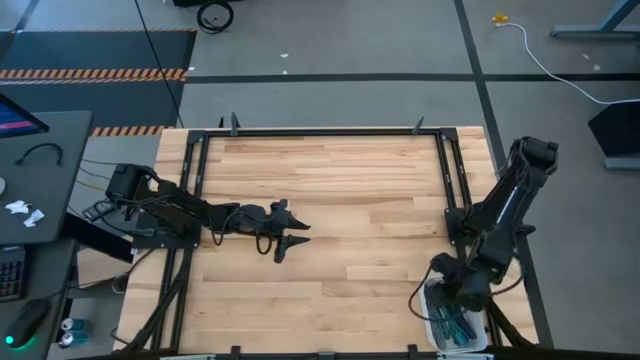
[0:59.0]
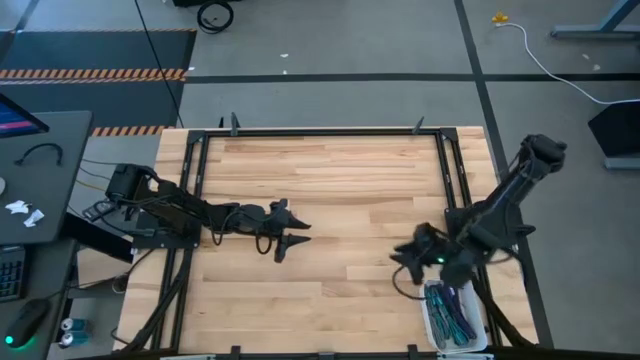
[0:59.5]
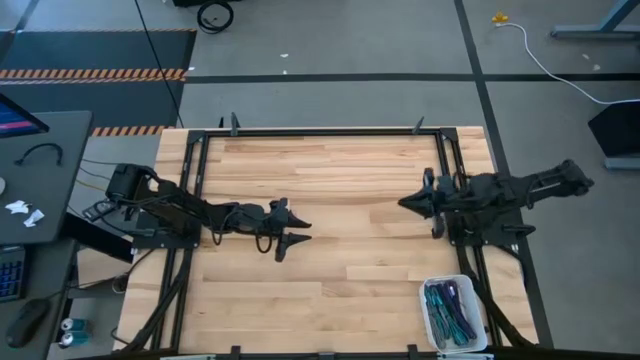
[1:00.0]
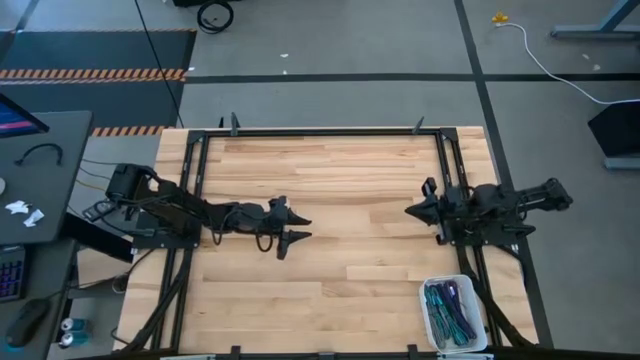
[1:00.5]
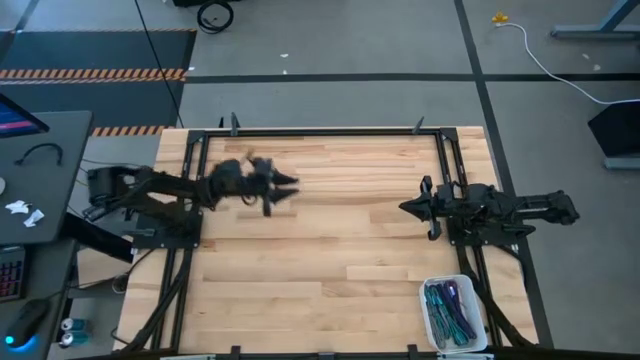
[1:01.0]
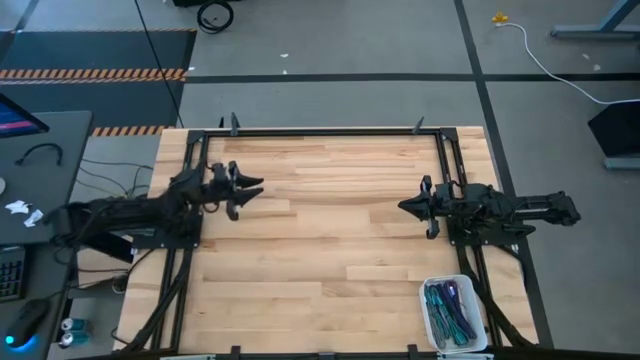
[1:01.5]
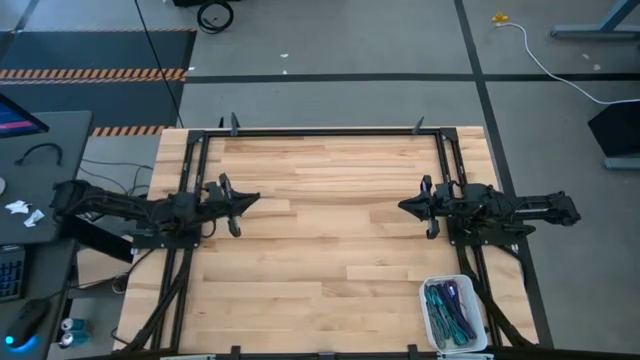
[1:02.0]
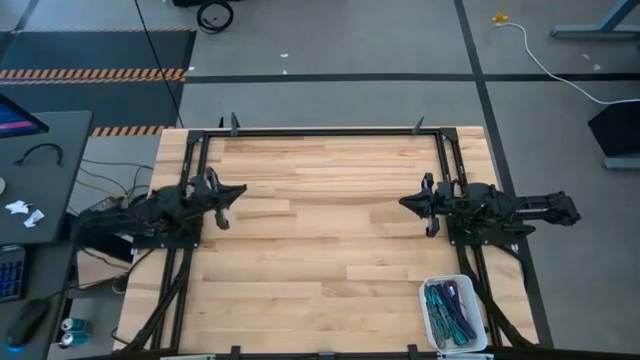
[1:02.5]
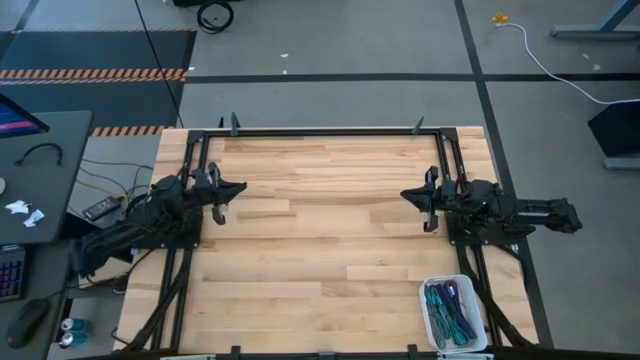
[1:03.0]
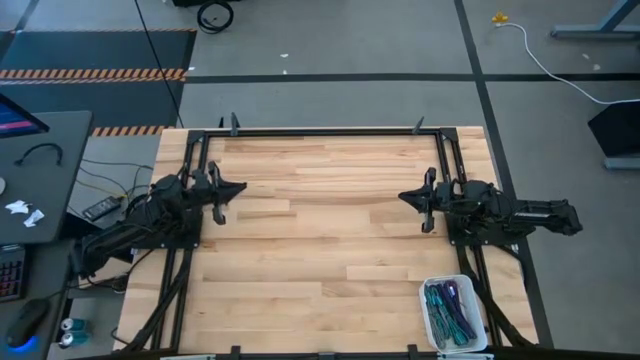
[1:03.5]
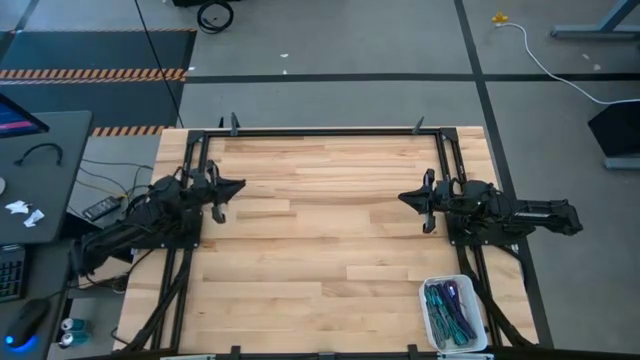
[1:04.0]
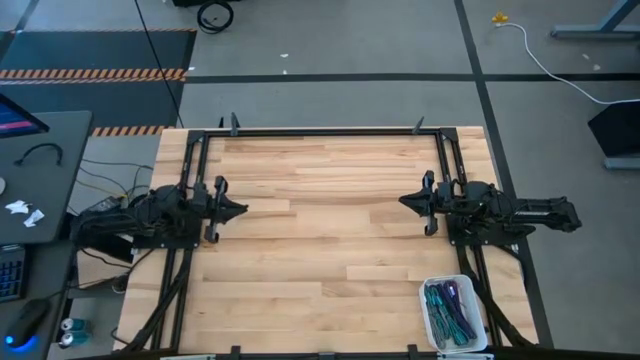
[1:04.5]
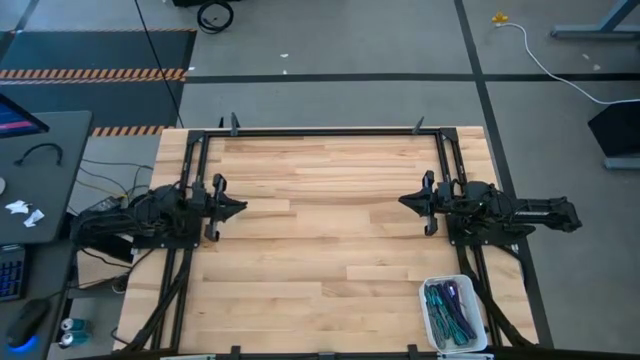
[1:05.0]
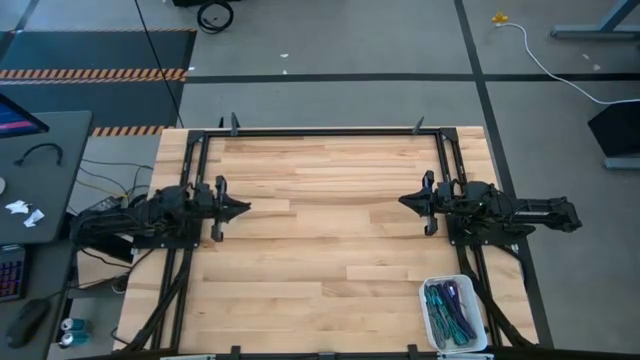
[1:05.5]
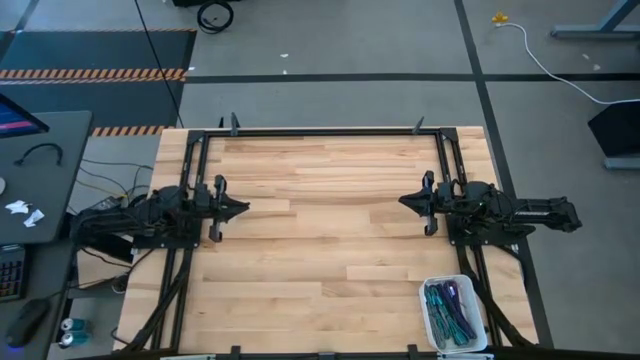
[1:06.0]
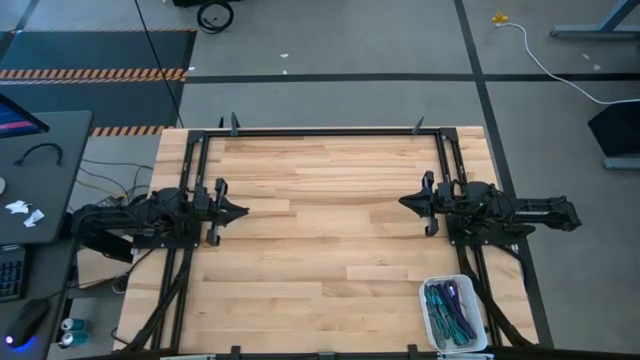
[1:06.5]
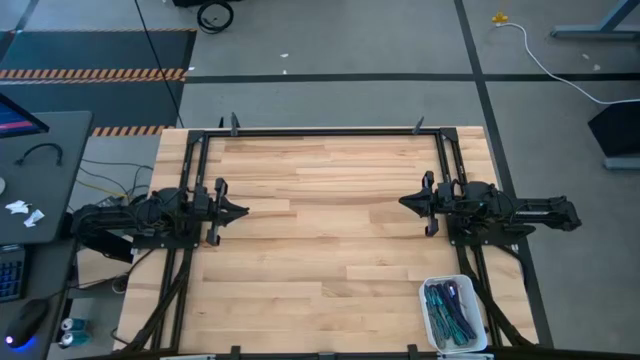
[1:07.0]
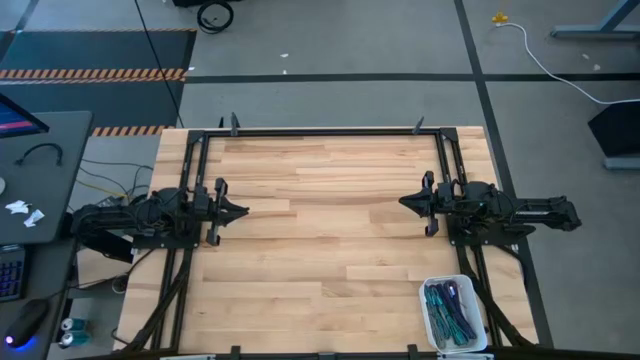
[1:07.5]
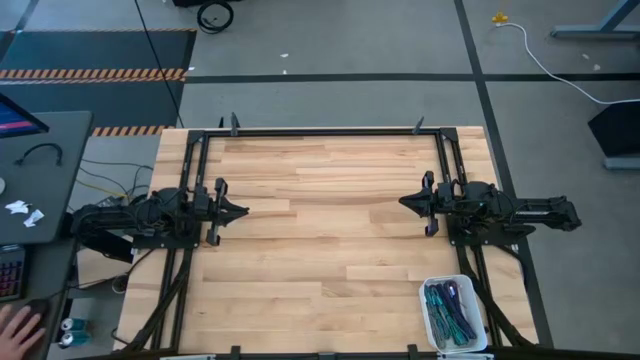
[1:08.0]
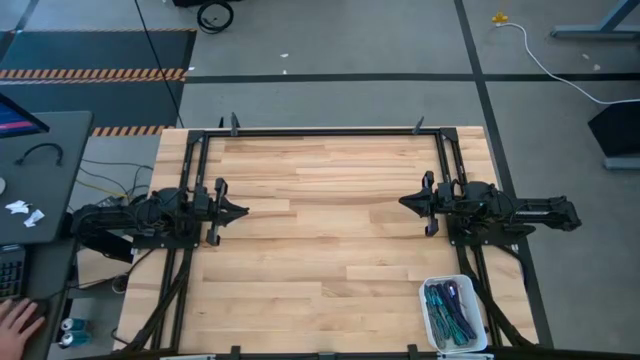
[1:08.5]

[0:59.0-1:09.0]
Task: Pick and place USB-C Cables
Return to Home Position

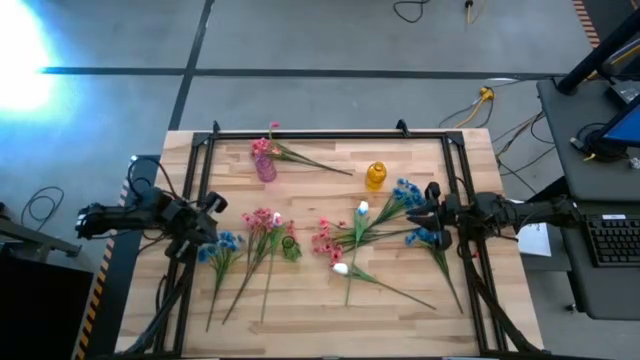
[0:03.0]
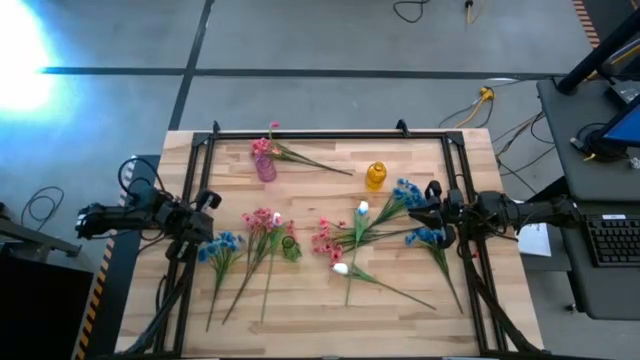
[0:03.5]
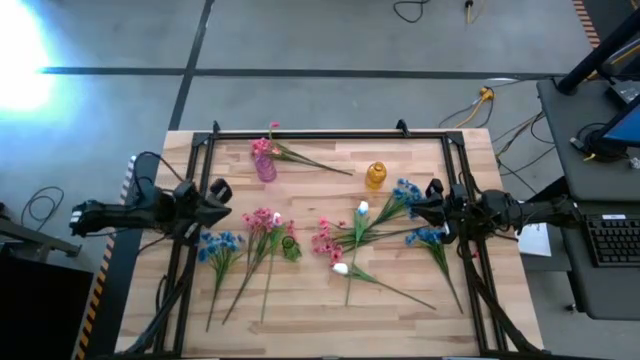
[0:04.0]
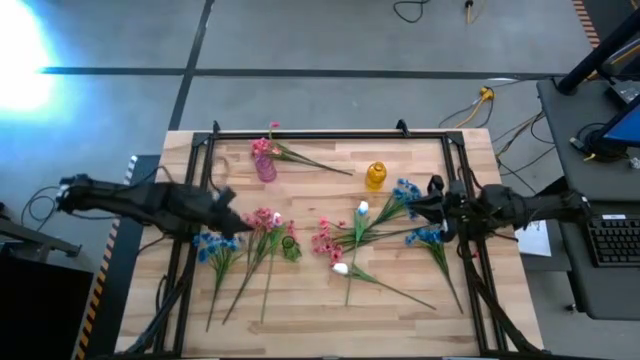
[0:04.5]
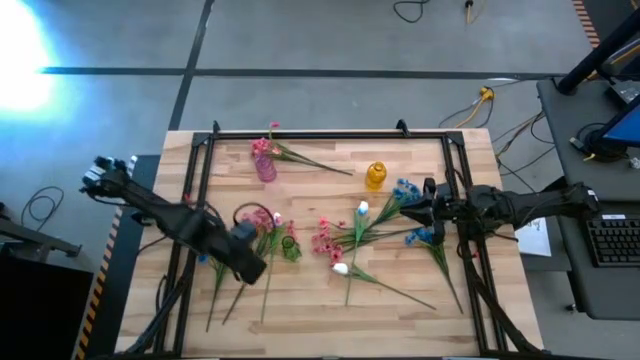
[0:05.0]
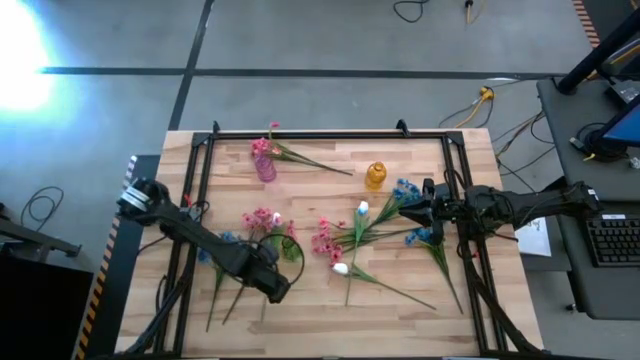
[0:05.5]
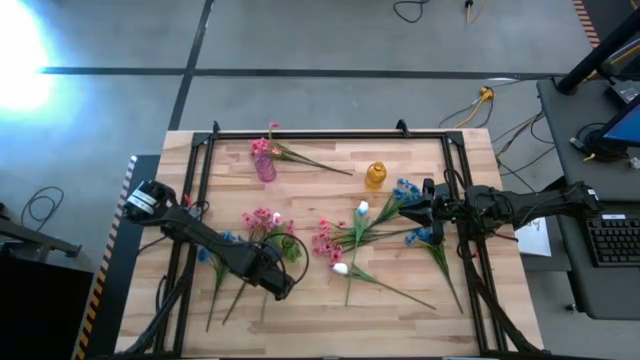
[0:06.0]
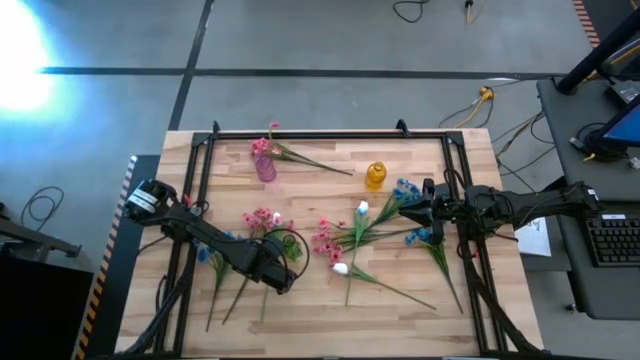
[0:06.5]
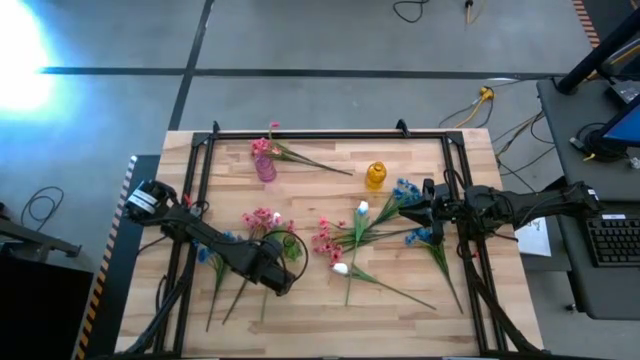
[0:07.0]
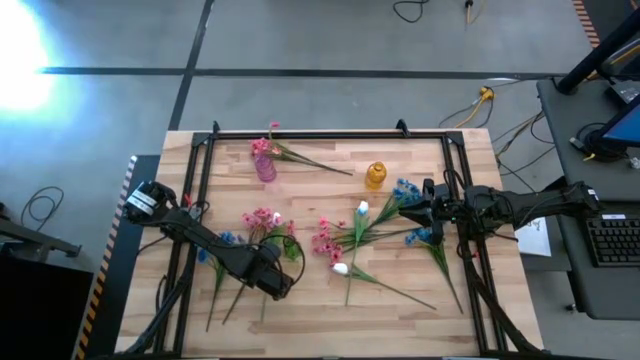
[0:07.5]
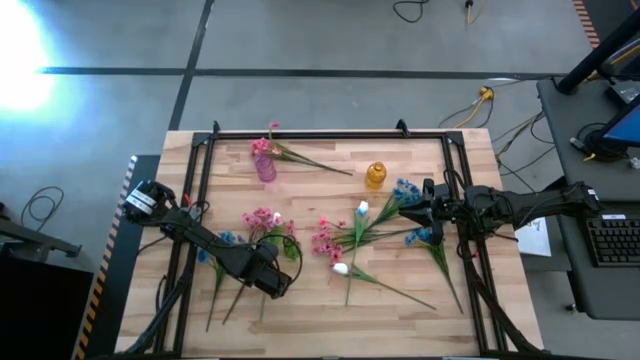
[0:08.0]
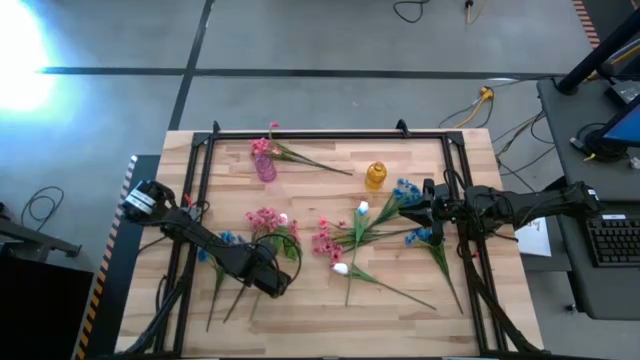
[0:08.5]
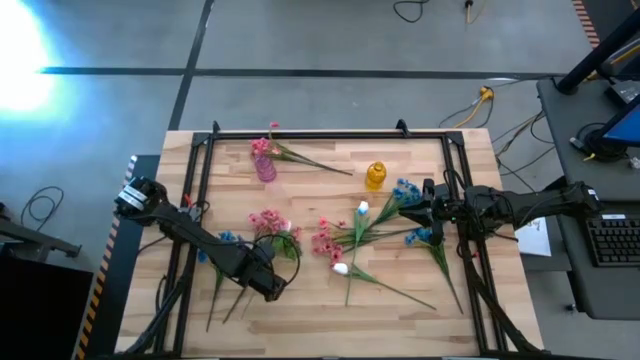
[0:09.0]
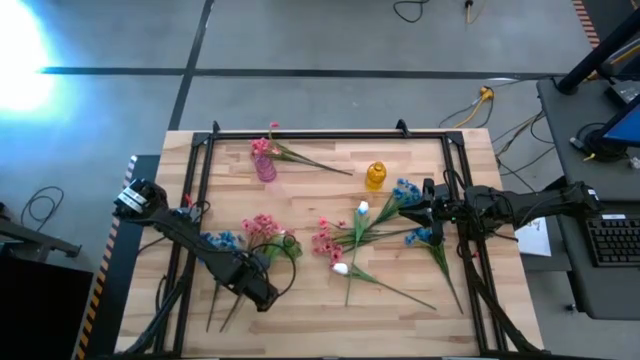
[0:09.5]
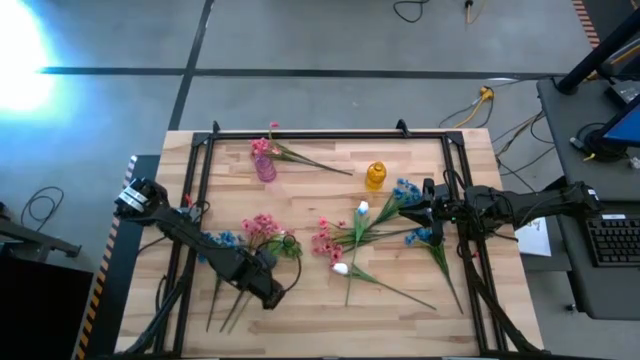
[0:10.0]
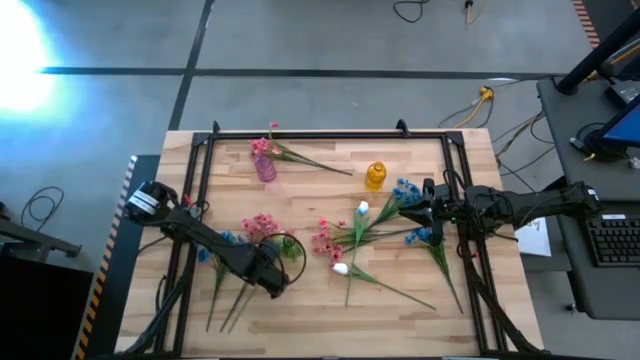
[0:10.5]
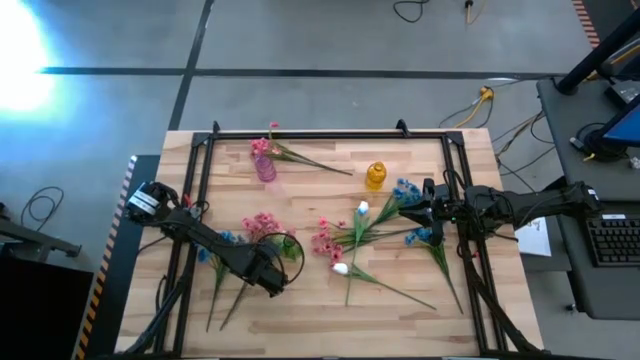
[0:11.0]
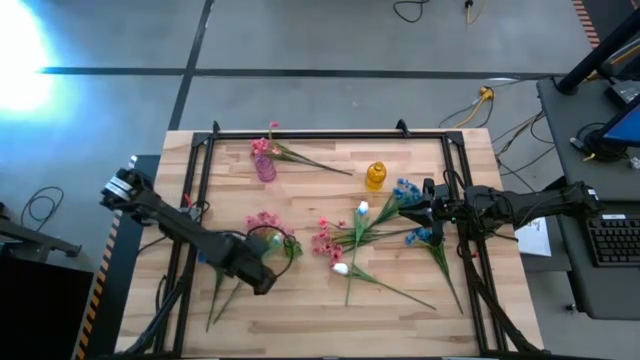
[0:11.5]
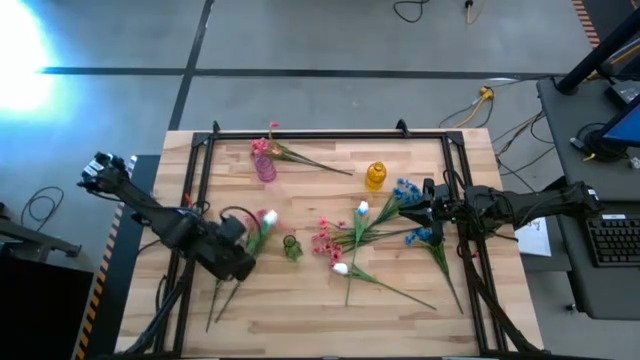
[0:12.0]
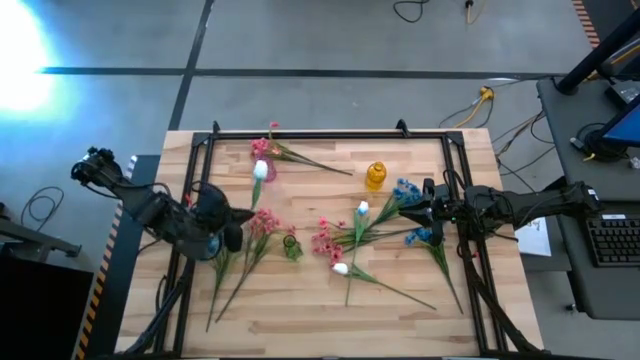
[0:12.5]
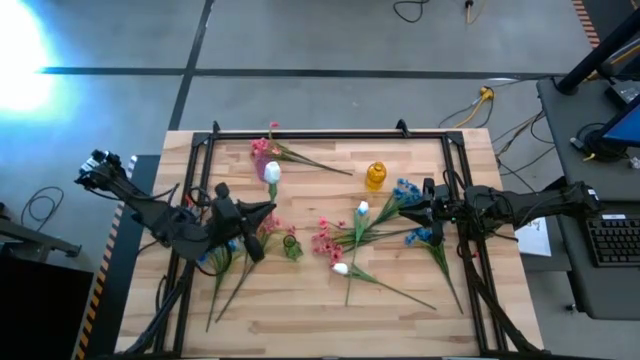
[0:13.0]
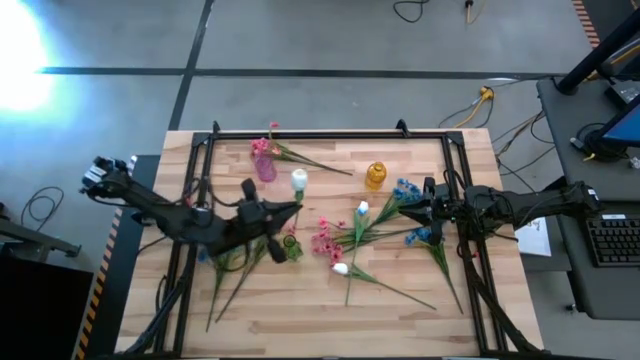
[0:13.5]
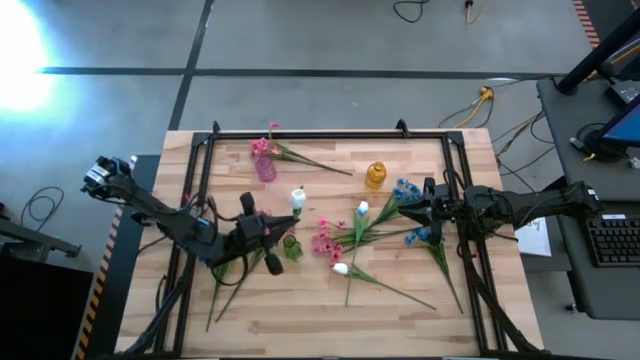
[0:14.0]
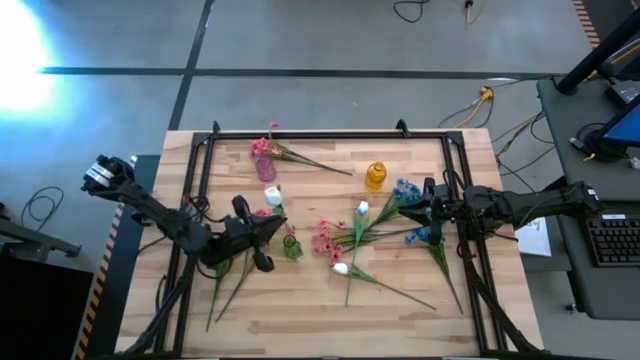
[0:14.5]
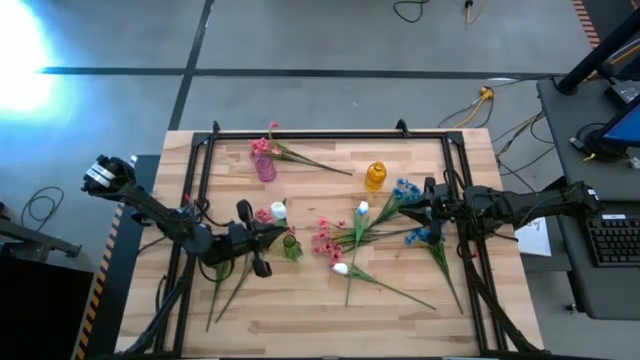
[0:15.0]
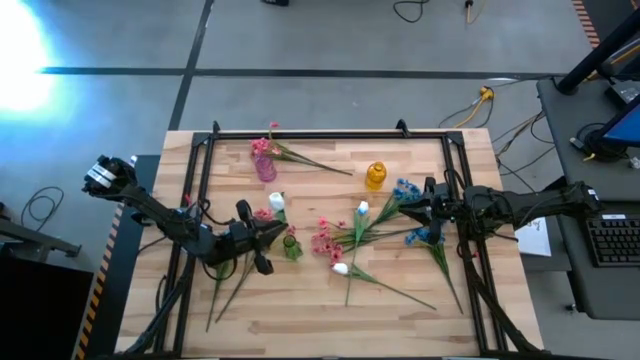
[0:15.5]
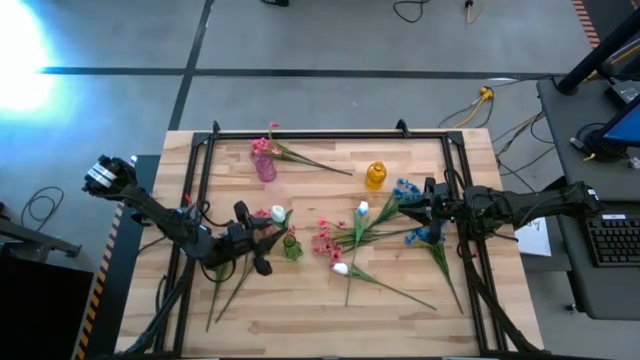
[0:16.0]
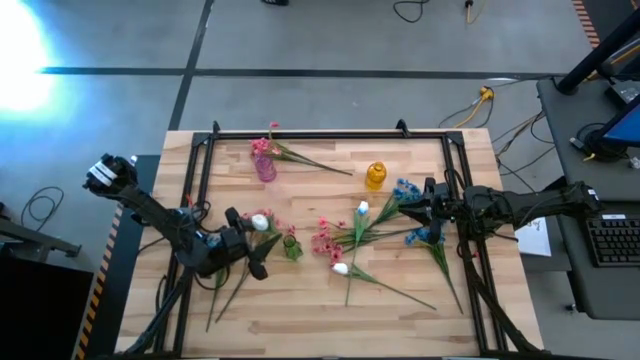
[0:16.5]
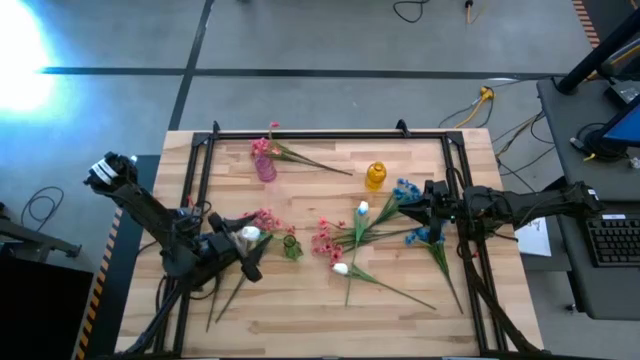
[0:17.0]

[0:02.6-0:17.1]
Task: Sort flowers into vase by color
Put the left white flower into the green vase
